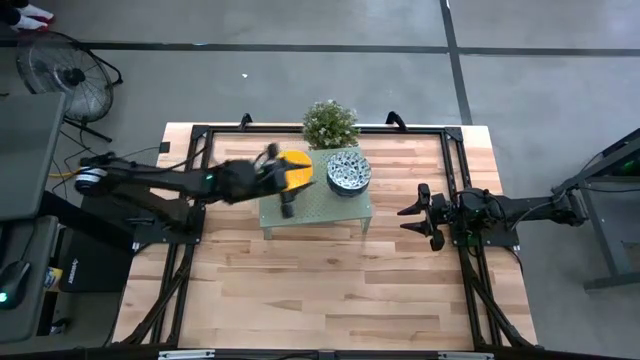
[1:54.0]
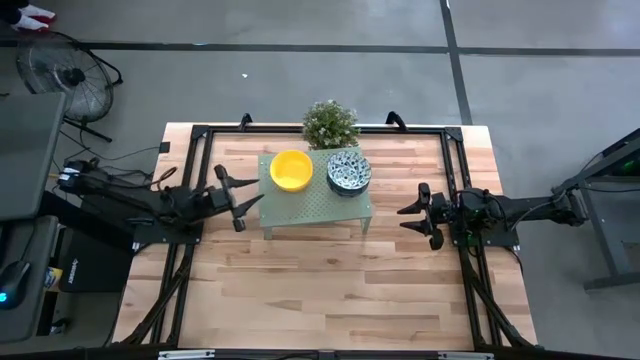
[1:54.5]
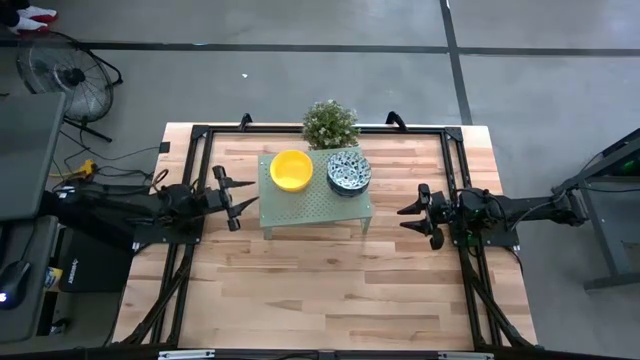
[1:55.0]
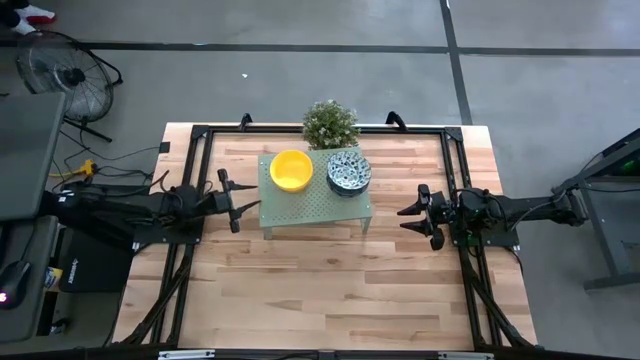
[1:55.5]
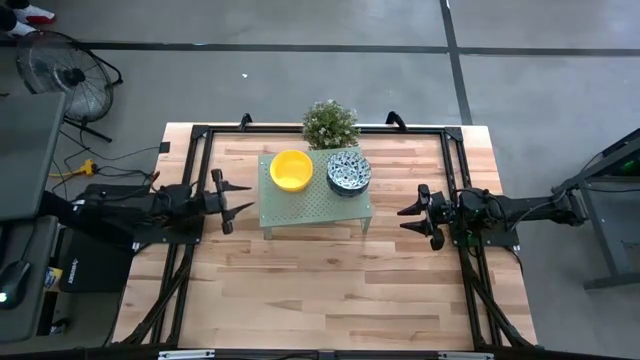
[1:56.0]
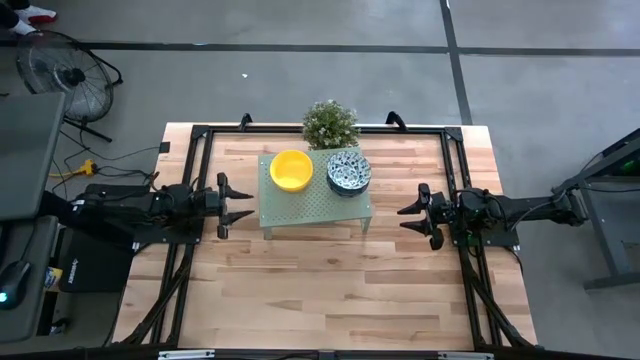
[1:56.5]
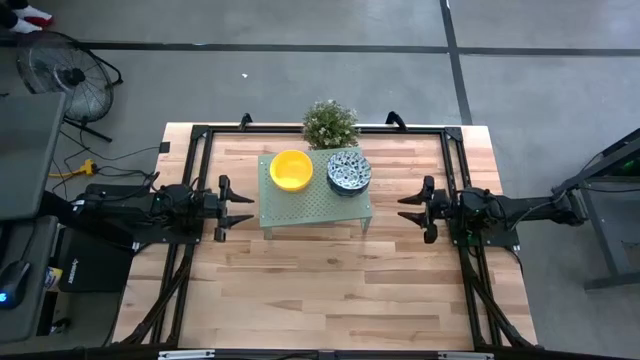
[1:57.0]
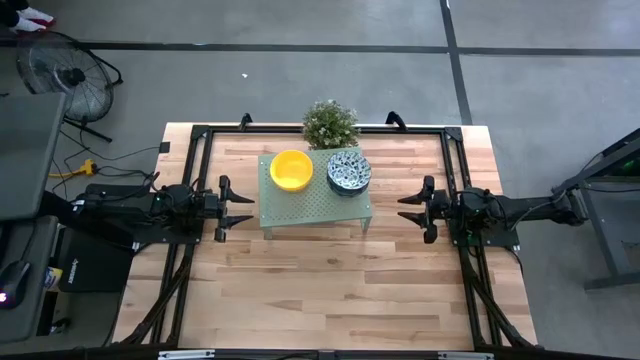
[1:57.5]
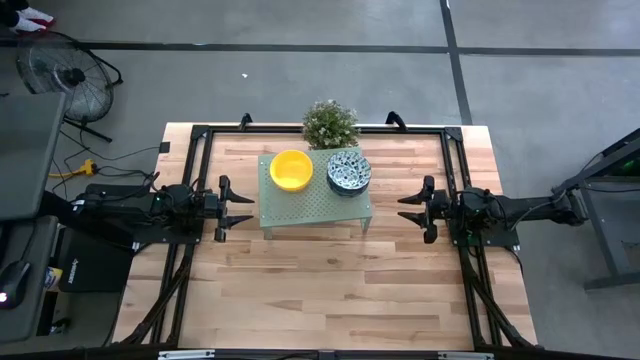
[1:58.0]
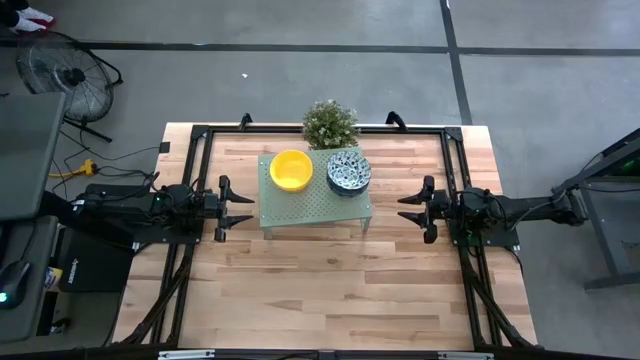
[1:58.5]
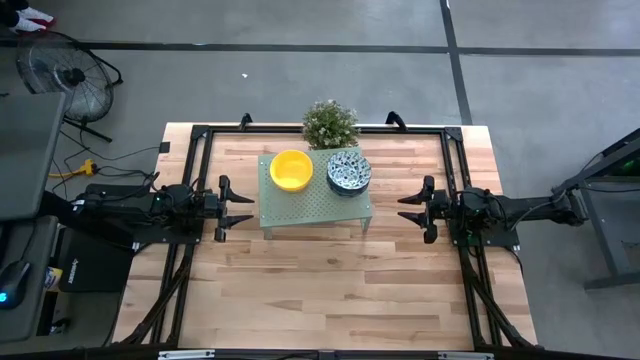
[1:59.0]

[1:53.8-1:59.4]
Task: Pick & Place Mini bowls
Return to Home Position
